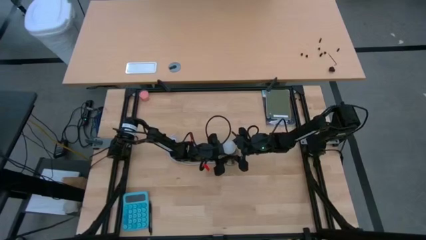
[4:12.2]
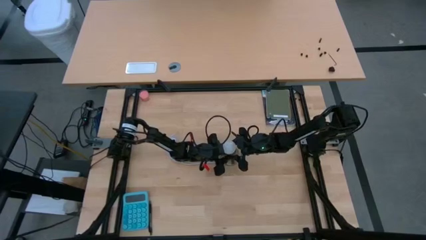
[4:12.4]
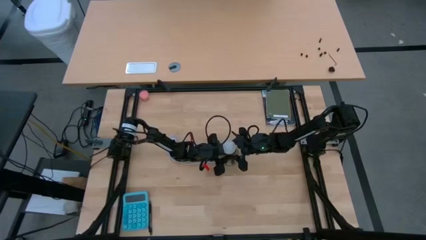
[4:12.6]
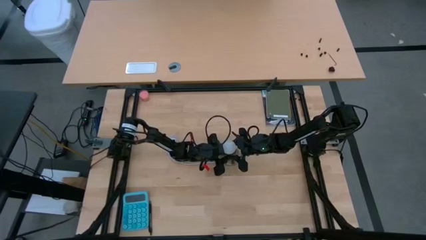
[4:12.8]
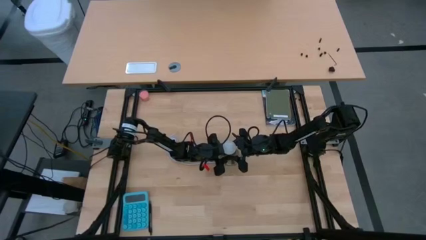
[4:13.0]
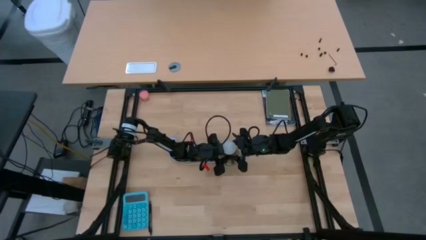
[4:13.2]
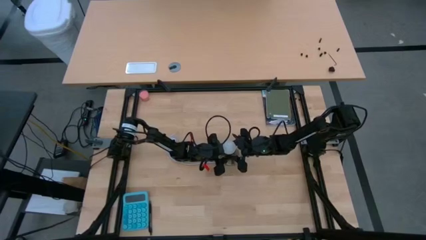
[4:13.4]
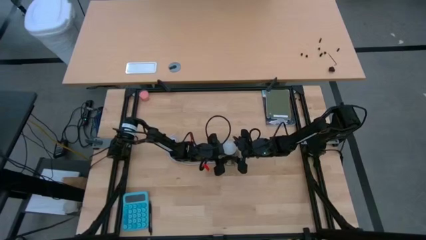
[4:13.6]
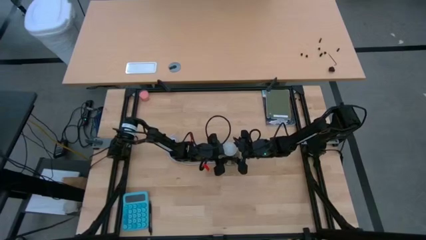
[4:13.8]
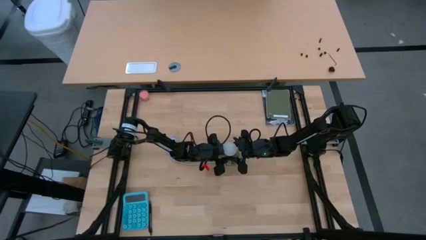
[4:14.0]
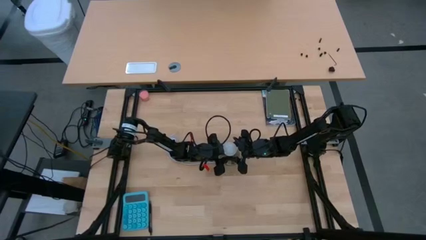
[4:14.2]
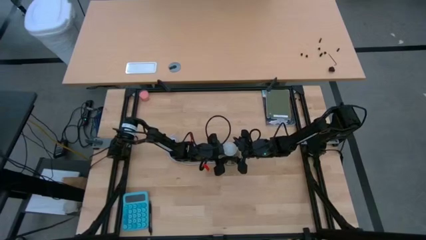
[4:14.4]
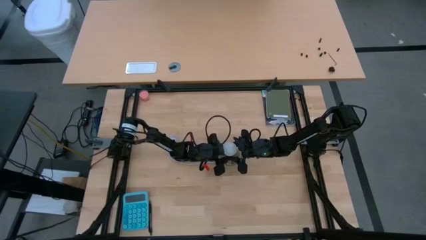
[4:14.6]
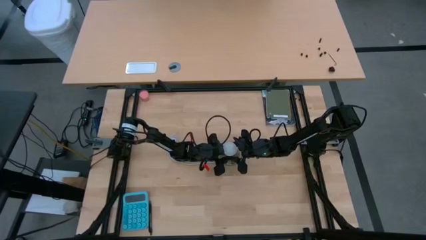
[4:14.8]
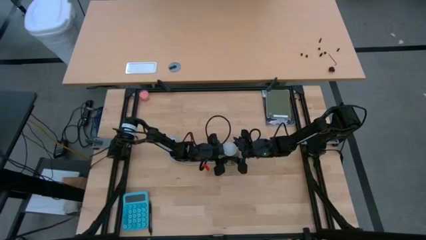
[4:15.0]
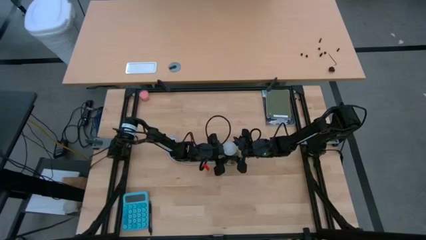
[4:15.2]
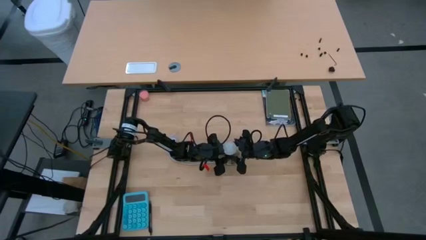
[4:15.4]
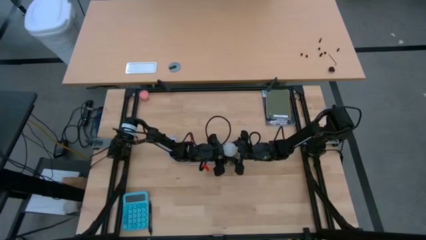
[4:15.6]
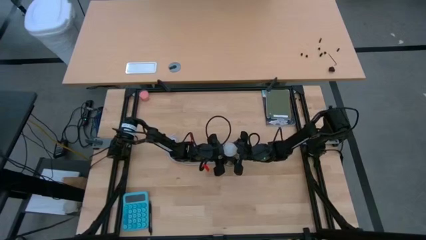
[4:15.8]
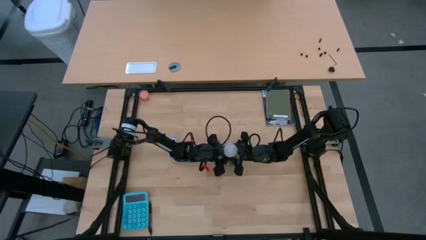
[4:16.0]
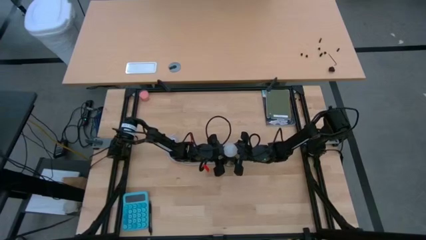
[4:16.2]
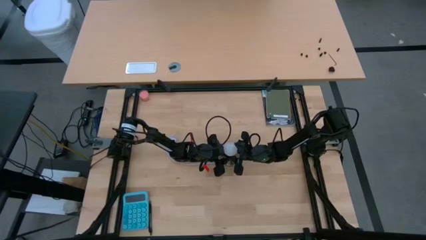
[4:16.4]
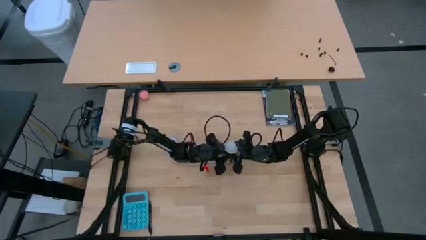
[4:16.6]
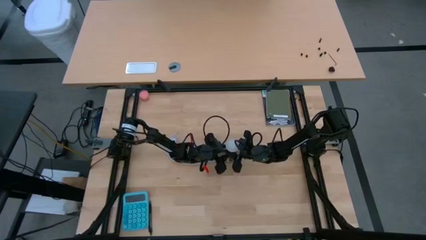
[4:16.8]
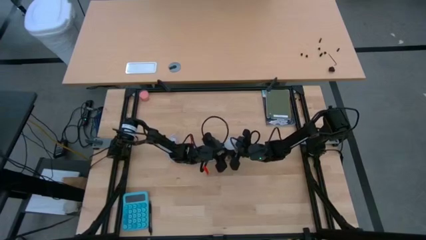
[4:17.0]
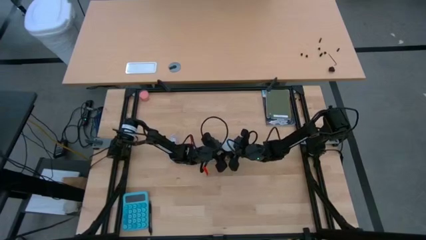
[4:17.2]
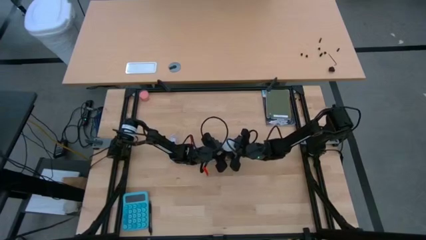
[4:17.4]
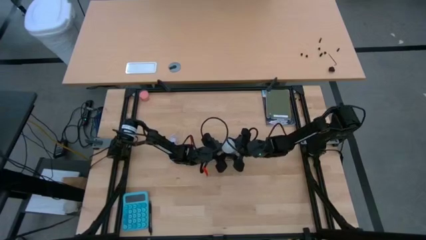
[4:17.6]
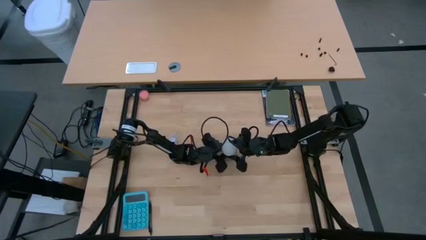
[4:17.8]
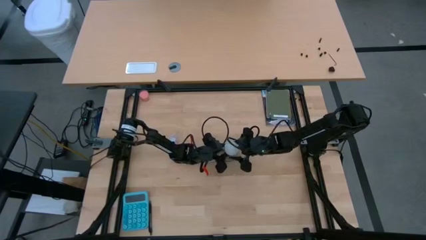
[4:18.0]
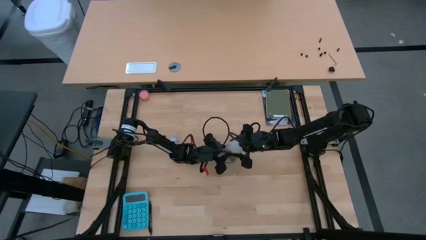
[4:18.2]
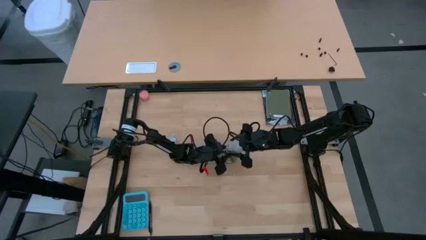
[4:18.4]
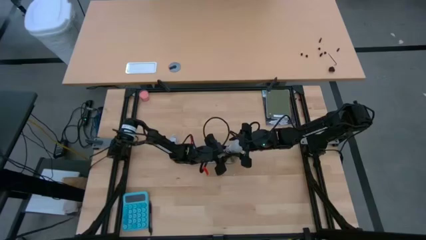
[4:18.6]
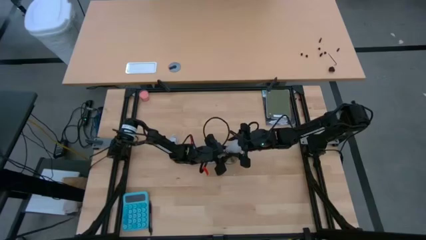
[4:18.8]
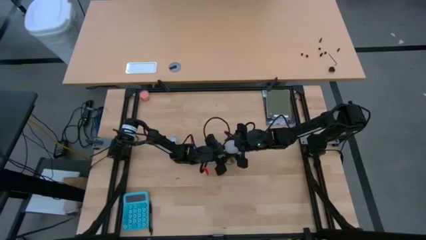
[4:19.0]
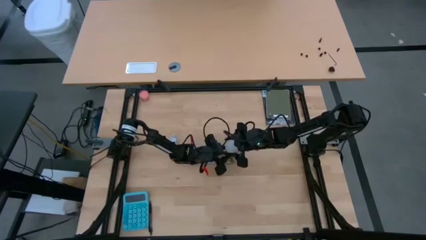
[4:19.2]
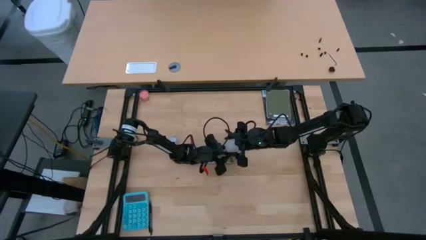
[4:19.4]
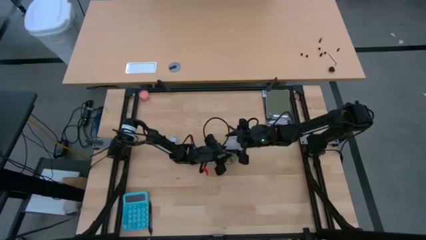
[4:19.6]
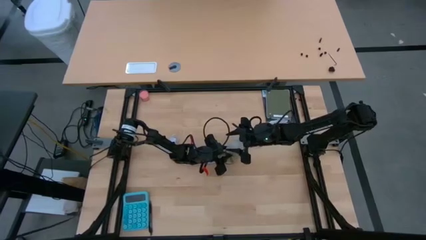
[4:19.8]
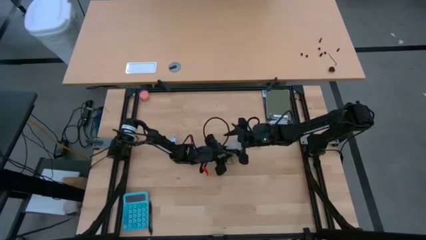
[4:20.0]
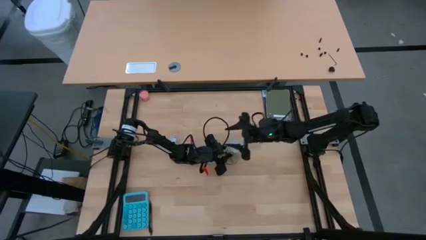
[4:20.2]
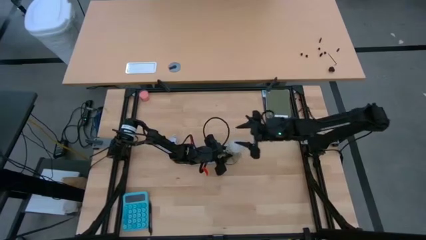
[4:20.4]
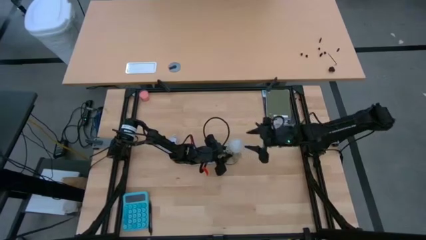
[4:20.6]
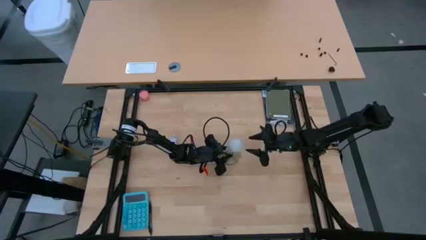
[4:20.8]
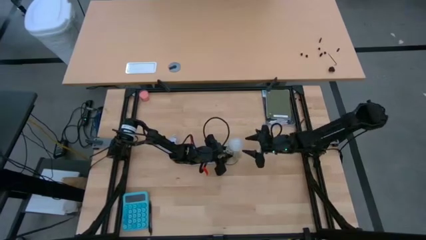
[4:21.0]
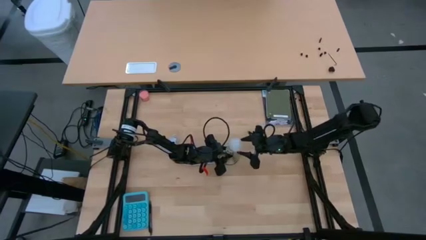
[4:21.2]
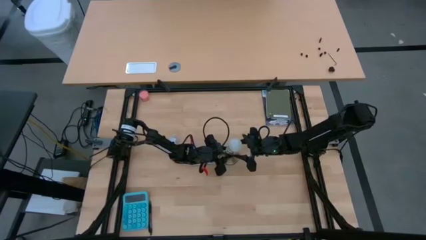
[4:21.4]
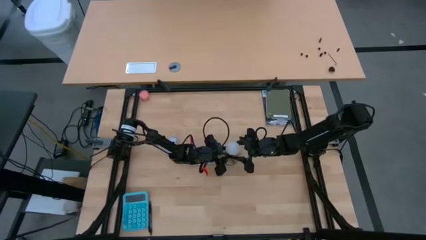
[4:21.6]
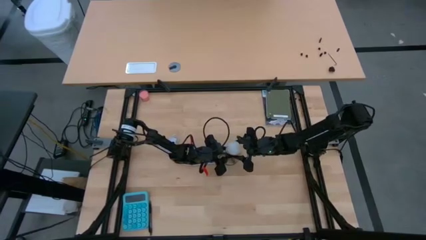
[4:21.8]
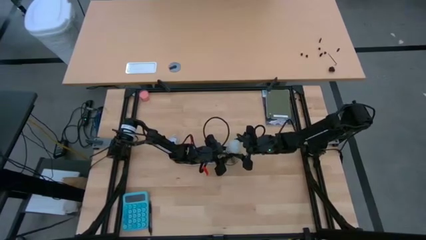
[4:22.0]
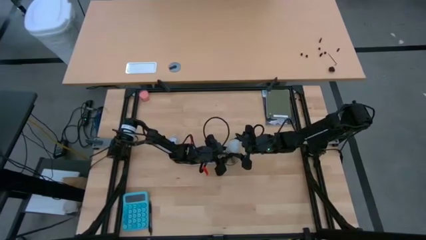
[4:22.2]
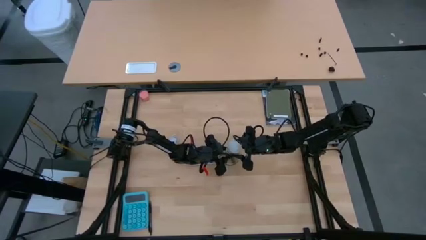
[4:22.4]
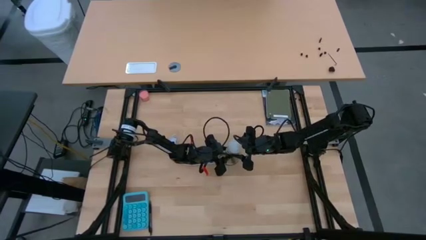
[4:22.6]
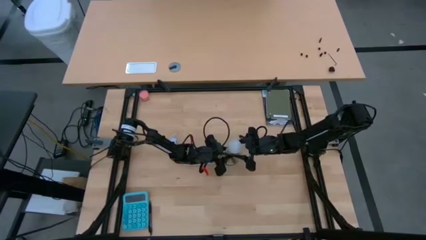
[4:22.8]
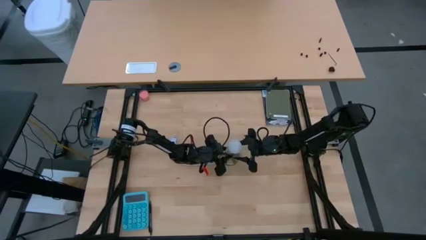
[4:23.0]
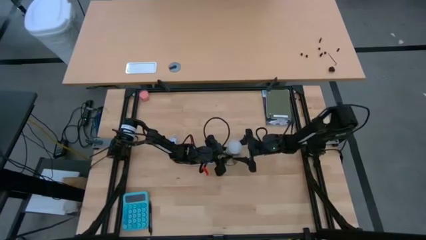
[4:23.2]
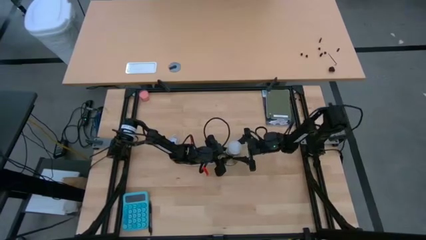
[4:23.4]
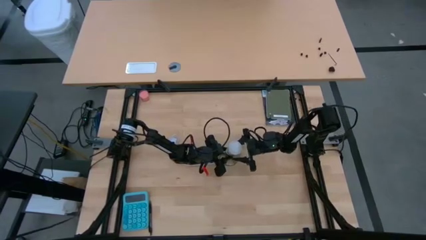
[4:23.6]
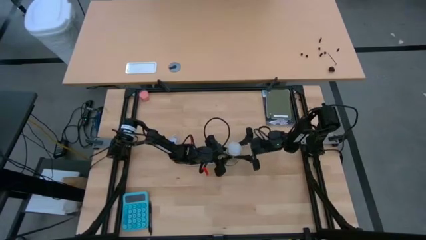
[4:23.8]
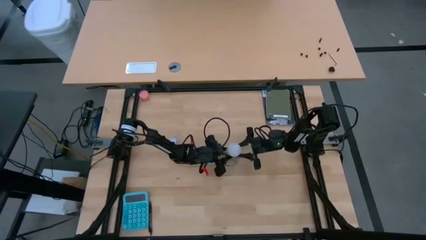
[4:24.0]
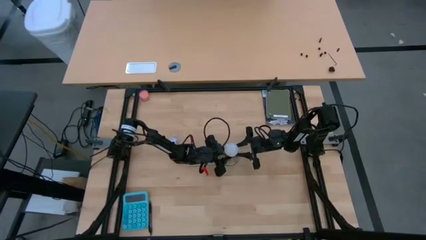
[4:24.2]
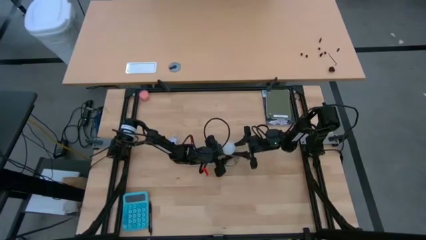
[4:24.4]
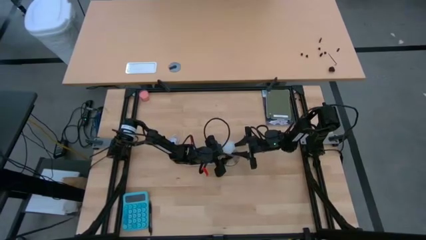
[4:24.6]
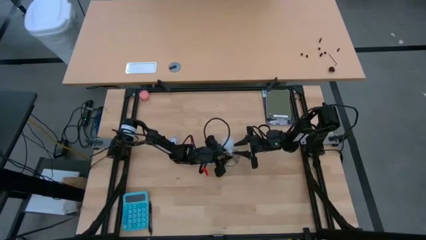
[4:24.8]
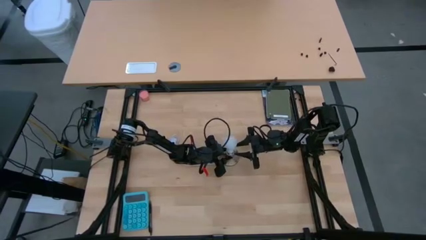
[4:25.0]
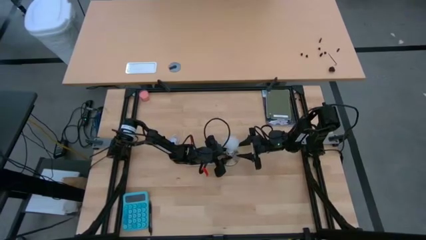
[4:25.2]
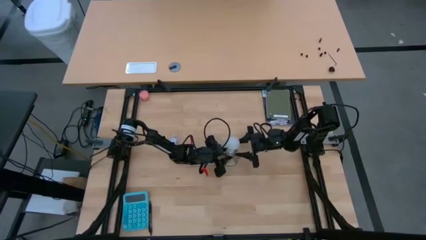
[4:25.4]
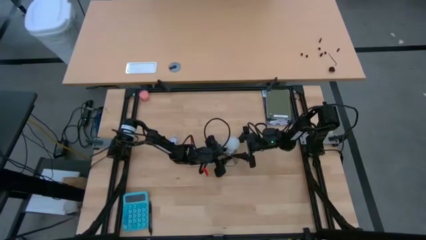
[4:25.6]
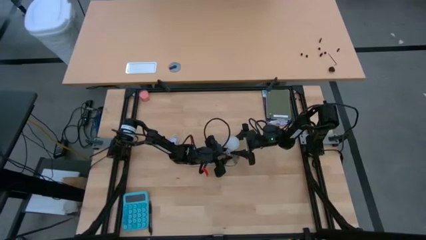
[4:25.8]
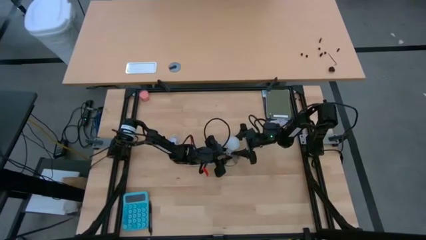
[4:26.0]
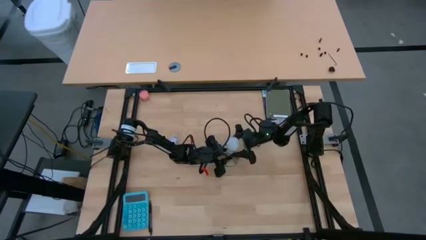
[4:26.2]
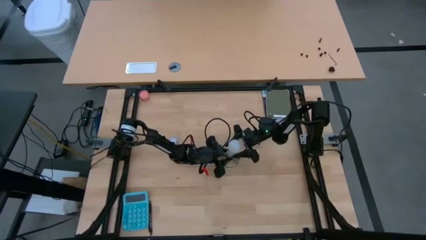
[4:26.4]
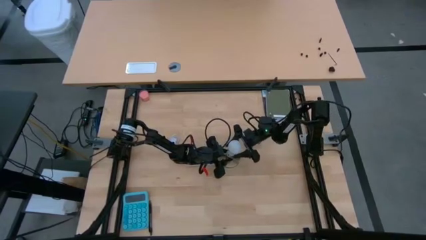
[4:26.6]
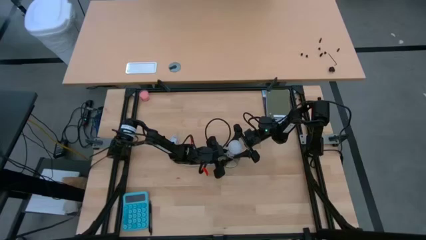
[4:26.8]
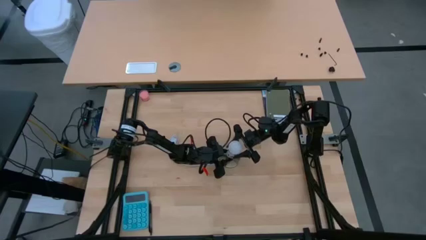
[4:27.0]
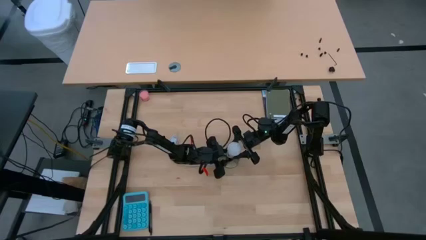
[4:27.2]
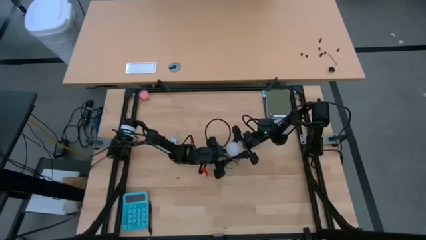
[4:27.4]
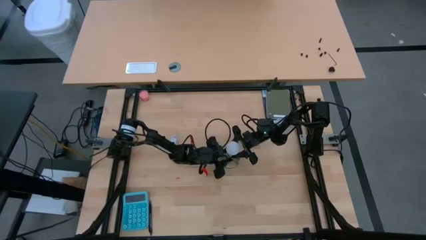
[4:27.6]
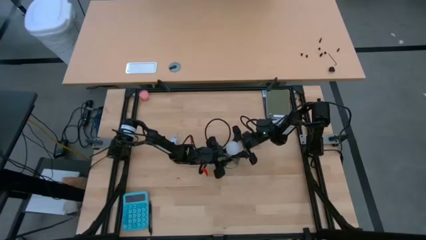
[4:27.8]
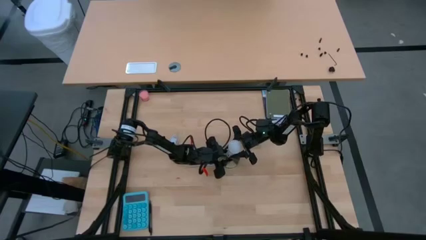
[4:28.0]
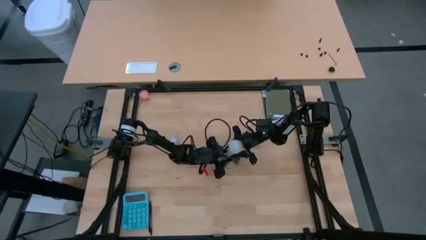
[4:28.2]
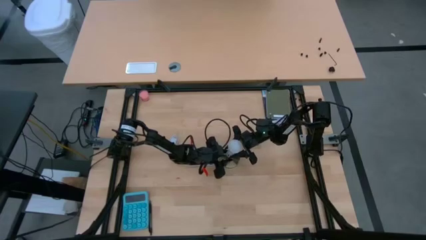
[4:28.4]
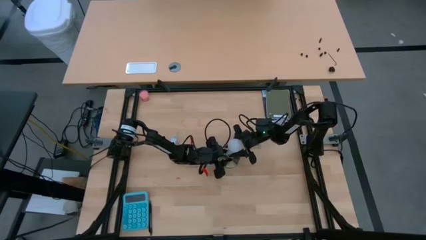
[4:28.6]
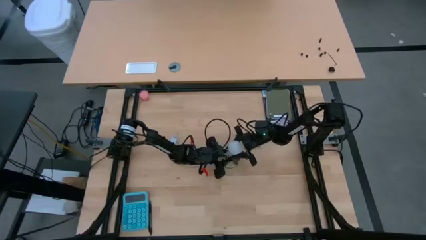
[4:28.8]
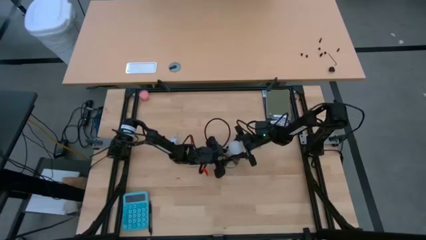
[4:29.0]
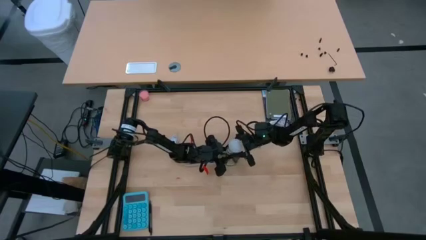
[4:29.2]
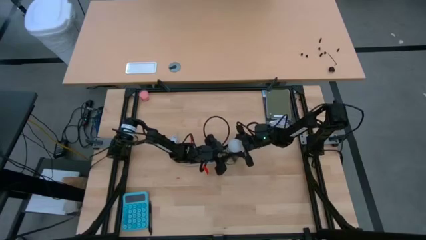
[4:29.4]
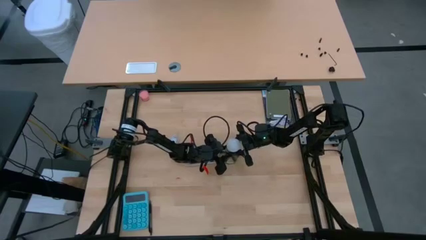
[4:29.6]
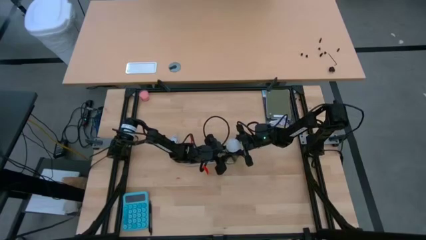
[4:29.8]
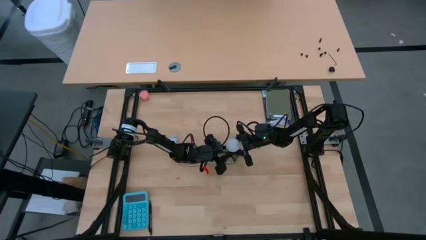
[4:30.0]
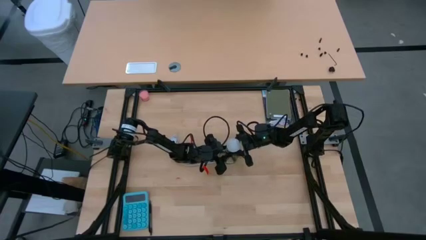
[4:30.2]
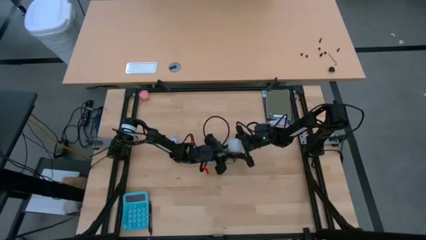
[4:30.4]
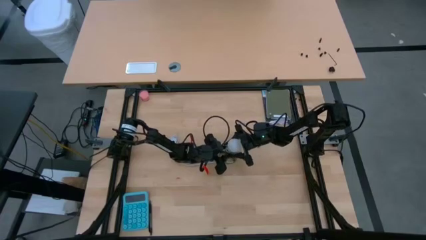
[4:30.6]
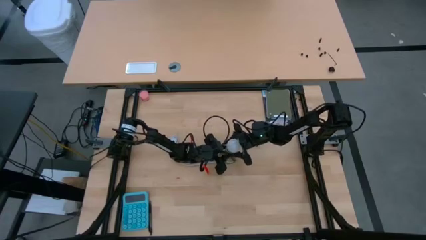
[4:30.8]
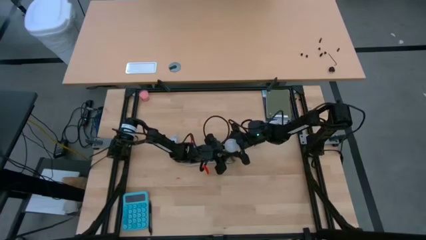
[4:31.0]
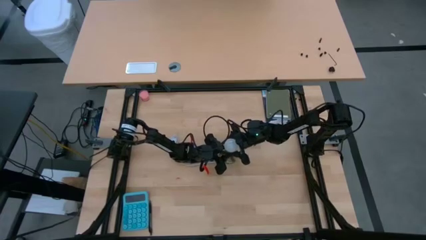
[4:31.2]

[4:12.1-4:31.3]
Task: Screw lightbulb
Insert the lightbulb into the lamp holder
